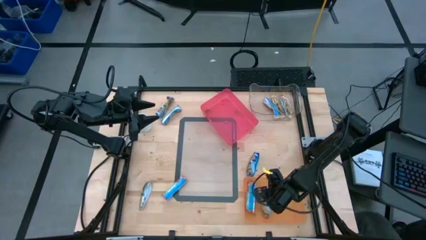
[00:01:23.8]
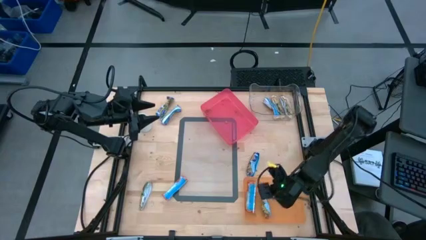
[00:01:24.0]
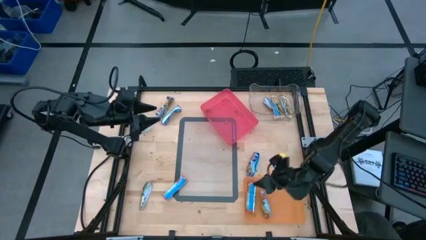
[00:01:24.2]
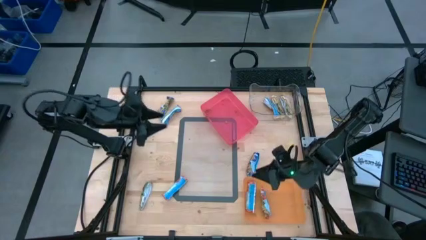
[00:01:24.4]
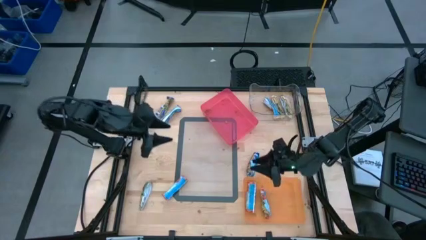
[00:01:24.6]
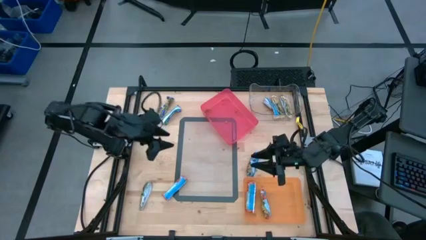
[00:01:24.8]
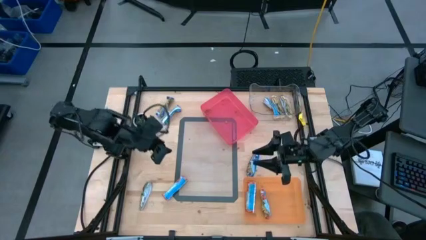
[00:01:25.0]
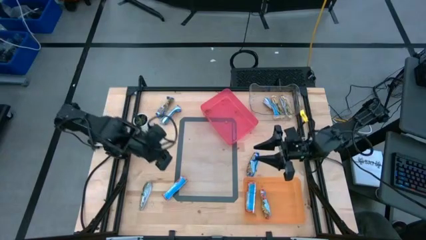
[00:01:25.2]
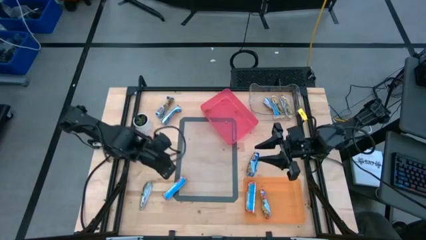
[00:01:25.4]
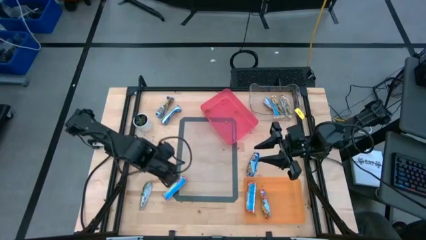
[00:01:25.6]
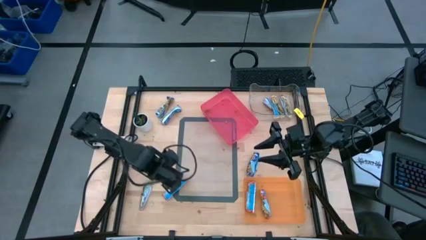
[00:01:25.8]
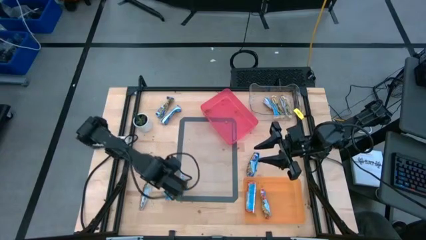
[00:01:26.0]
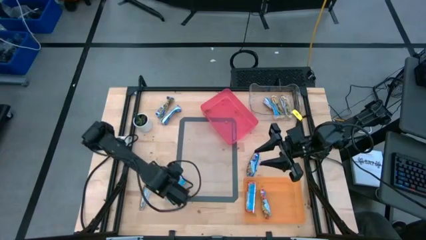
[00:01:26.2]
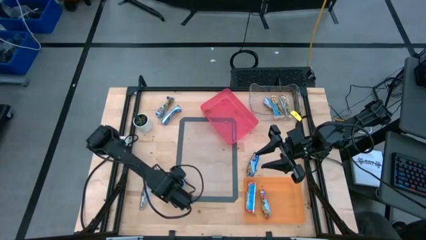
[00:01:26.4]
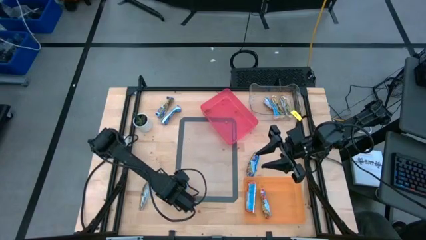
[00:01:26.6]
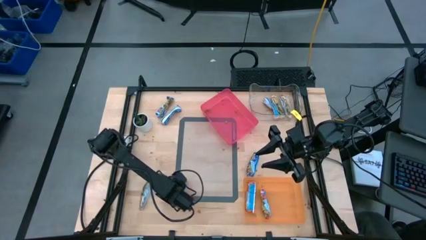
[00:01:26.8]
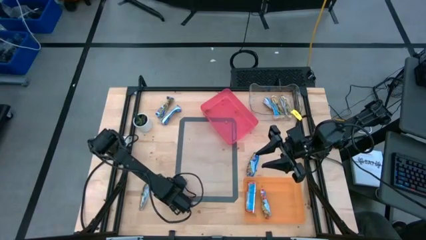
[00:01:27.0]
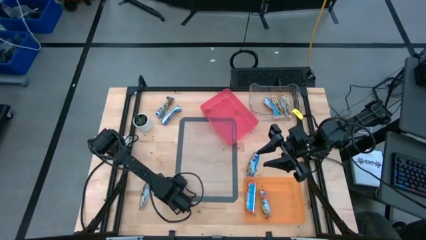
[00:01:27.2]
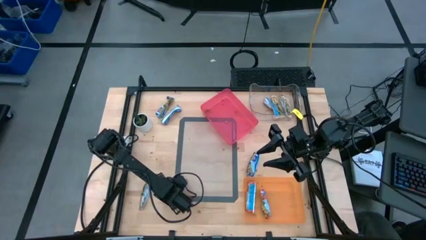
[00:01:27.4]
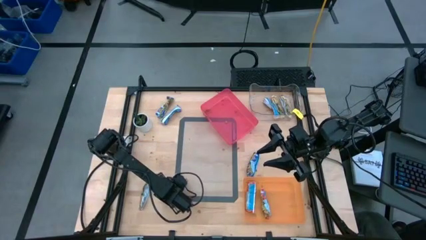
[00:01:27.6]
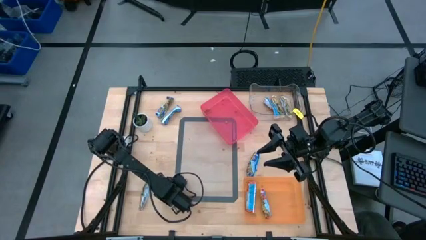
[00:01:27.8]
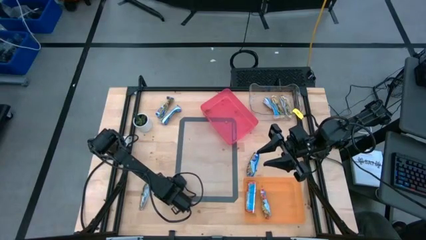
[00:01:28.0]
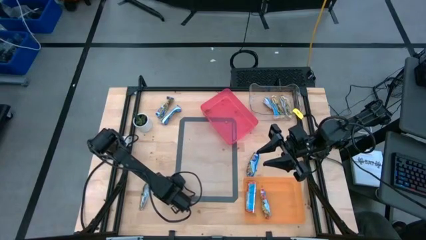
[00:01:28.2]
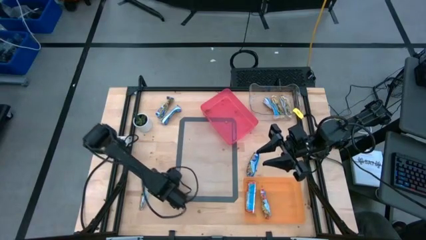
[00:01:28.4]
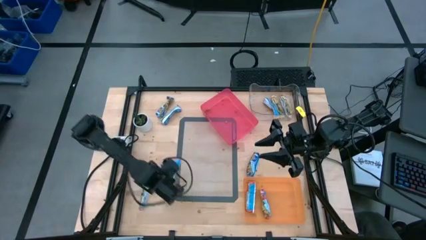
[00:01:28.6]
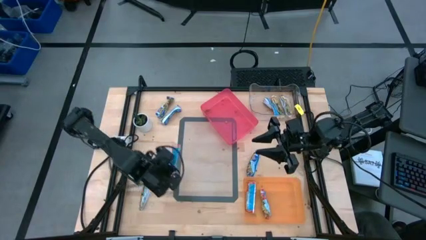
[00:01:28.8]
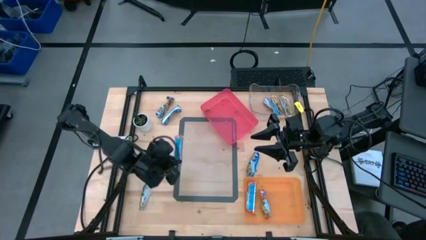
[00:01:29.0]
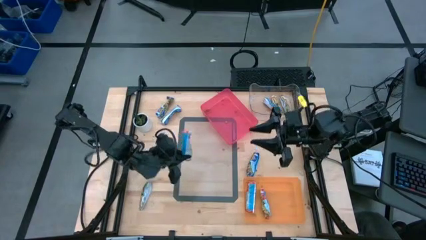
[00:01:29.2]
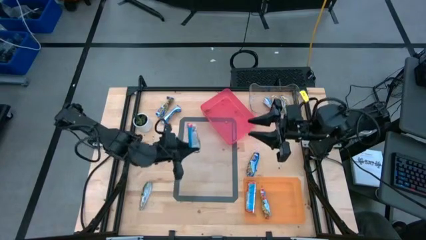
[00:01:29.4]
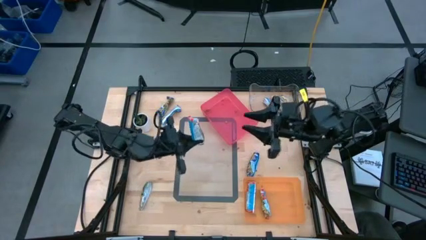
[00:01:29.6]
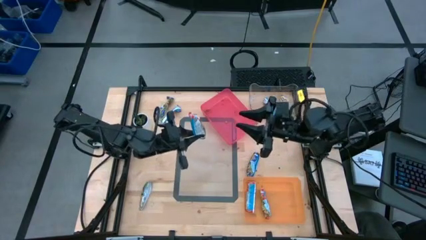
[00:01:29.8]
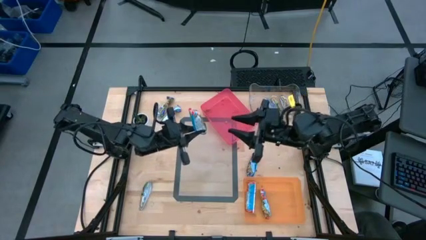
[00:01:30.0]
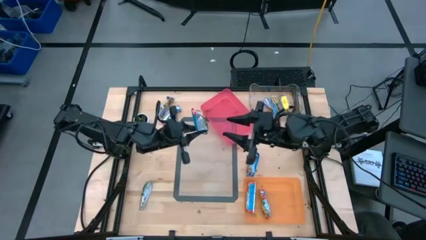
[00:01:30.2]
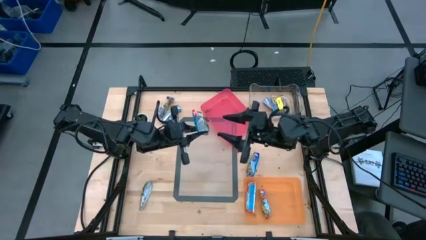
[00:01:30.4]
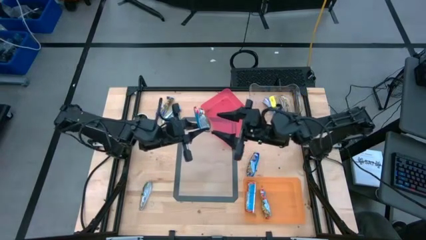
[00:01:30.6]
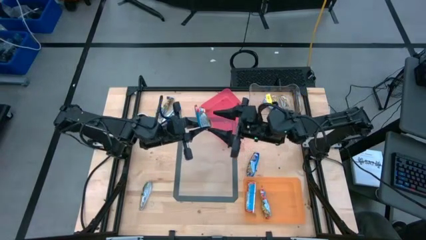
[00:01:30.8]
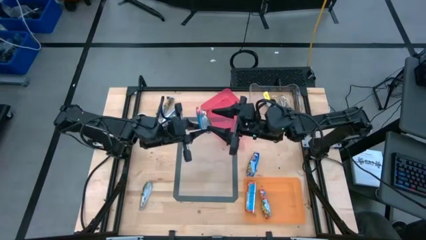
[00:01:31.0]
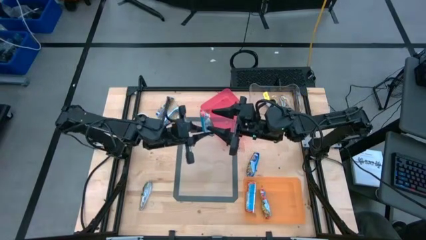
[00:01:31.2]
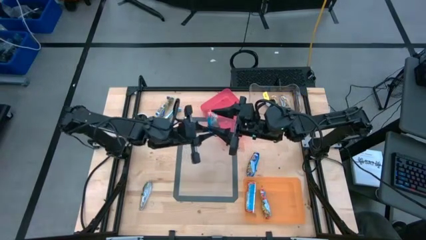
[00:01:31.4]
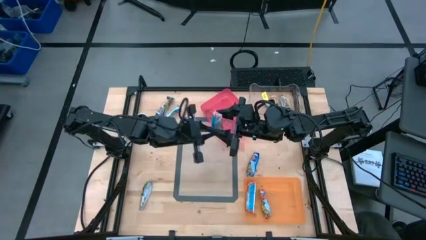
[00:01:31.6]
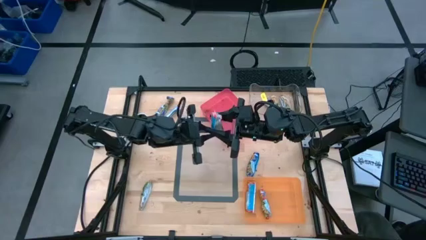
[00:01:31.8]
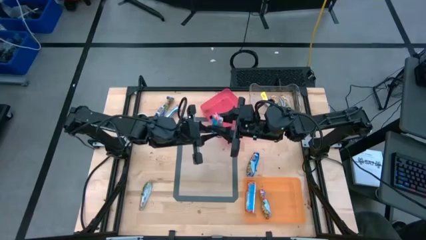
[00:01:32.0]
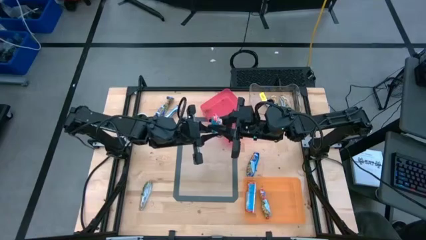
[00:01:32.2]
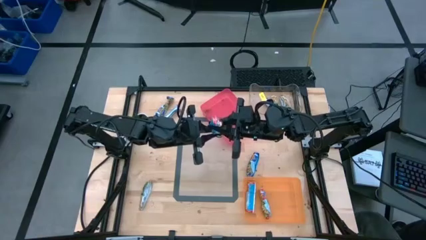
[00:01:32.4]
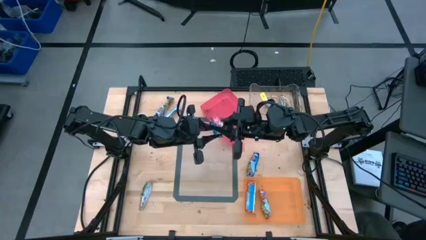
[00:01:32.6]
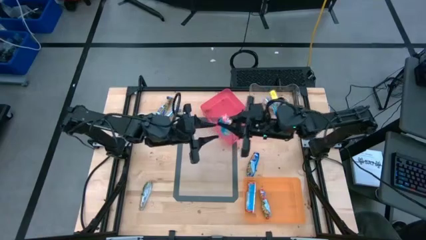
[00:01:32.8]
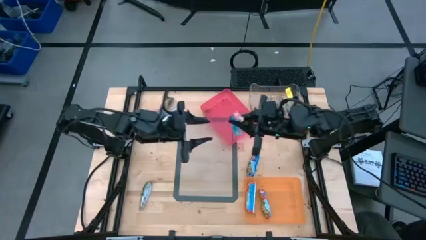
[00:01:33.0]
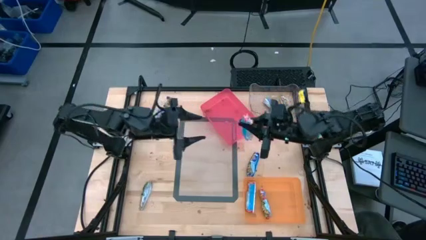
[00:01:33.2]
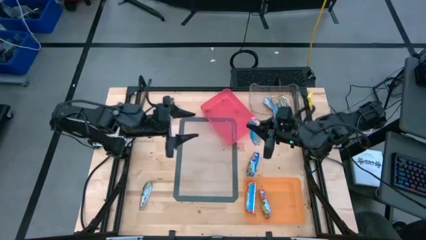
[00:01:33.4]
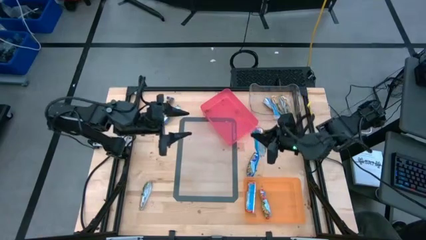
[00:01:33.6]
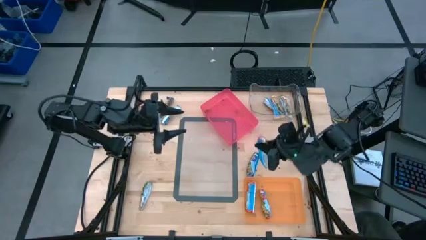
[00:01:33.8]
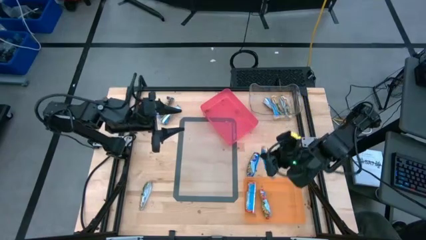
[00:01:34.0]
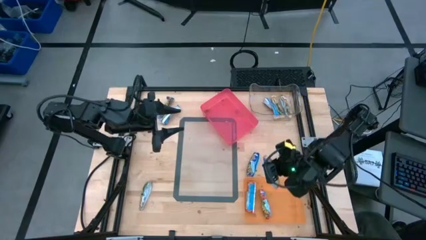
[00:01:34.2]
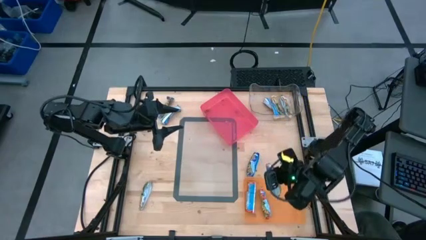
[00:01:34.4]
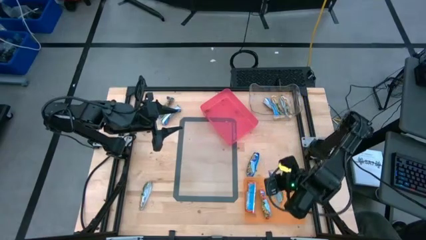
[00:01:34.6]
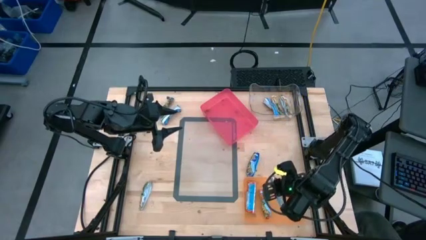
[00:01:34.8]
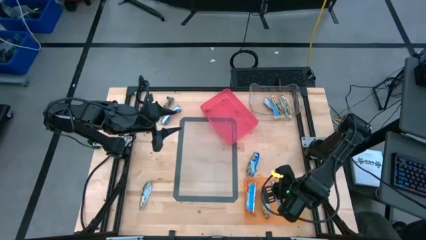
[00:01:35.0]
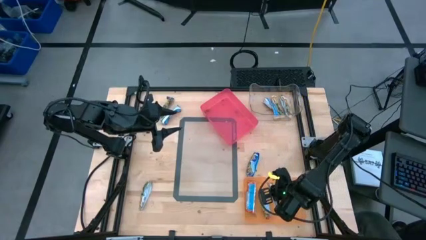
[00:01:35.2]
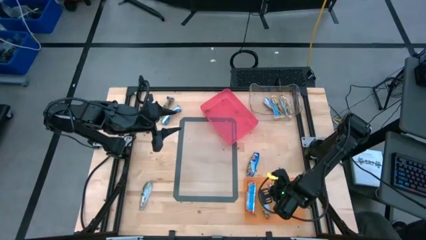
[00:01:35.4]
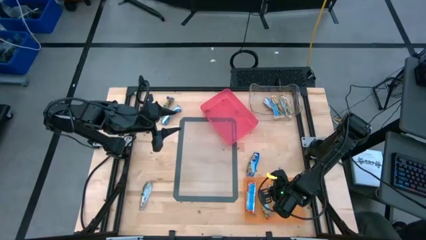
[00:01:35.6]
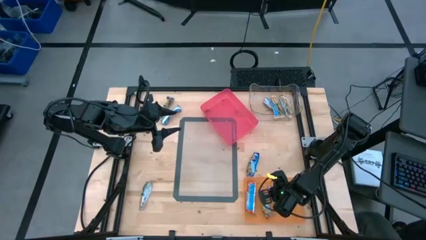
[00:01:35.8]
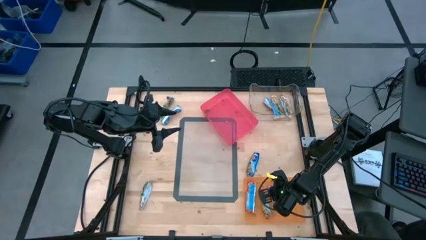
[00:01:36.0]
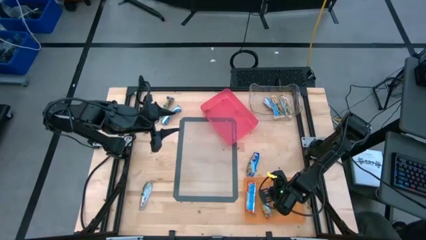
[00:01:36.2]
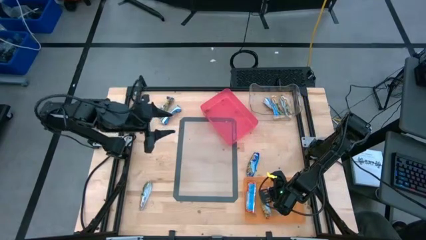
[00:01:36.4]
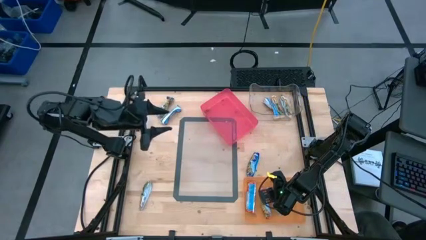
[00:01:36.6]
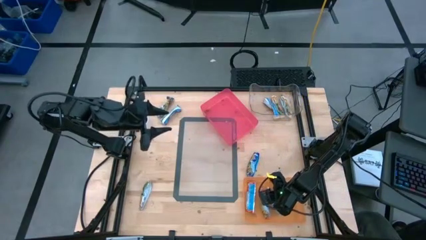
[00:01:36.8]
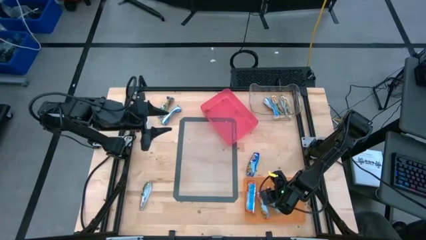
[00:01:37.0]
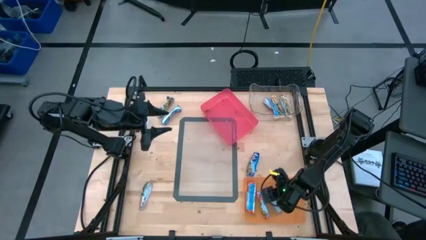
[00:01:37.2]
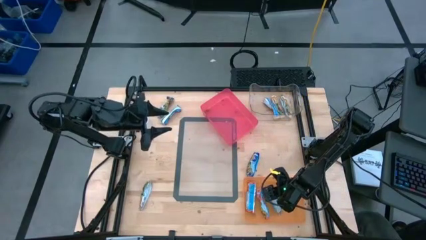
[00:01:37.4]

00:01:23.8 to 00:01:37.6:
Task: Pick and place Granola Bars by type
Put the red granola bar into the orange bin
